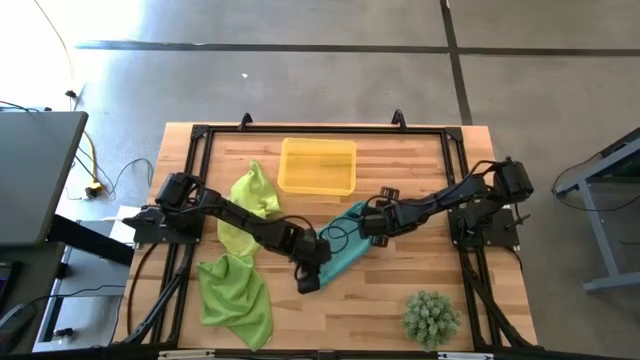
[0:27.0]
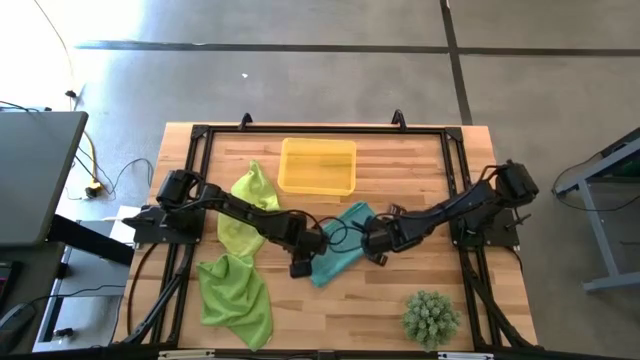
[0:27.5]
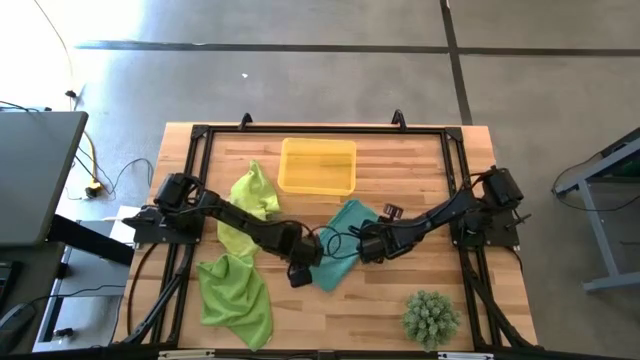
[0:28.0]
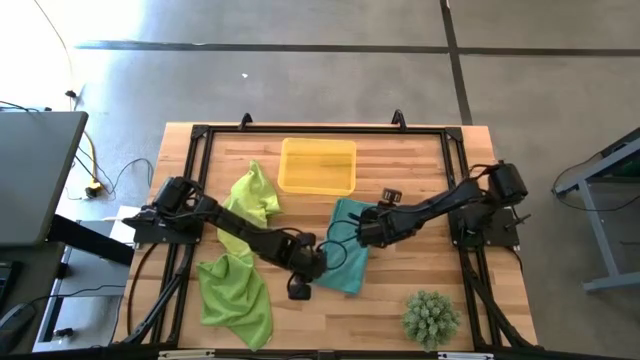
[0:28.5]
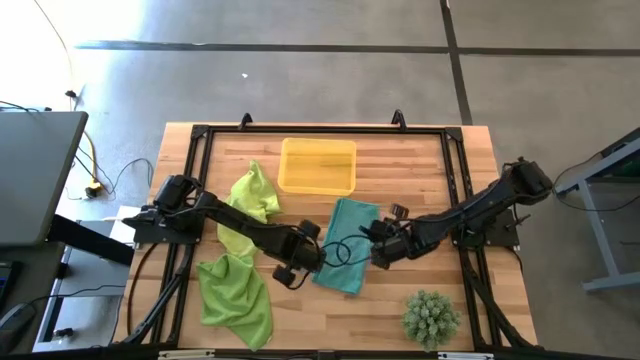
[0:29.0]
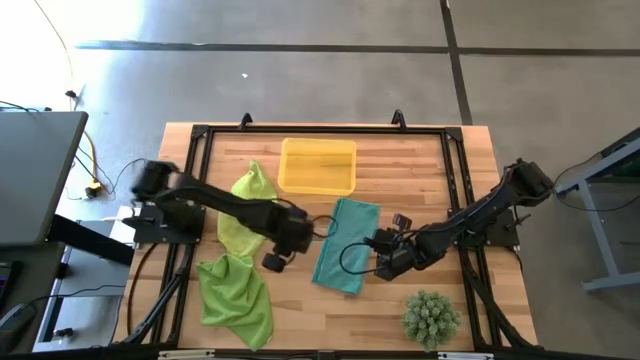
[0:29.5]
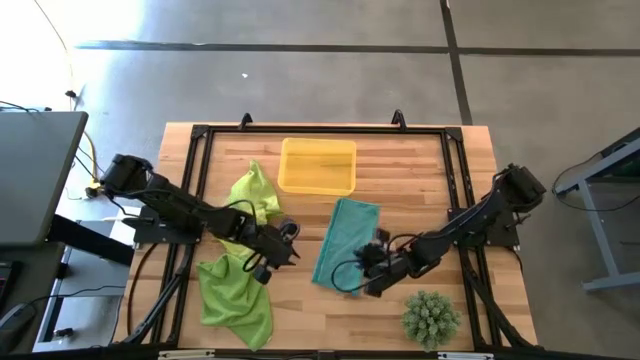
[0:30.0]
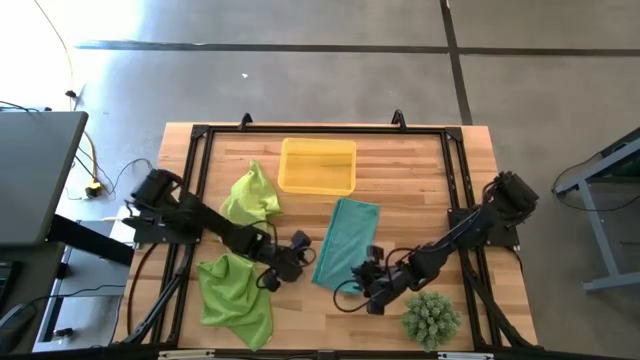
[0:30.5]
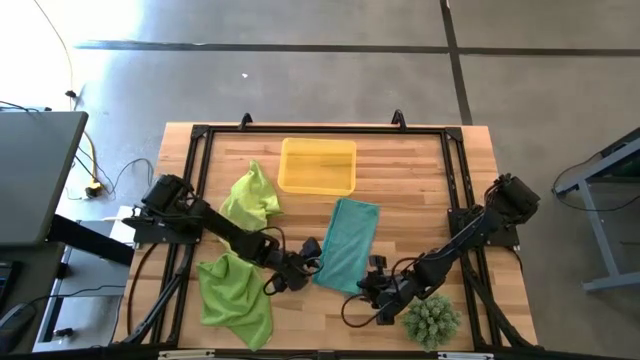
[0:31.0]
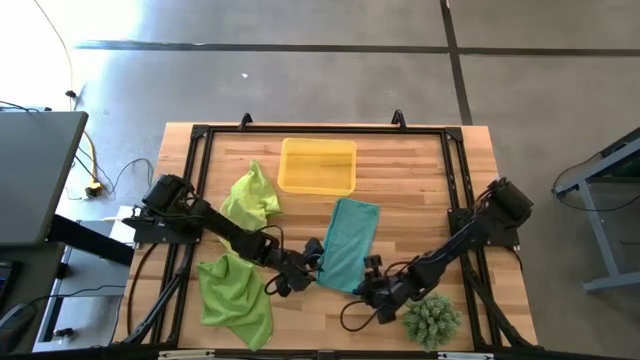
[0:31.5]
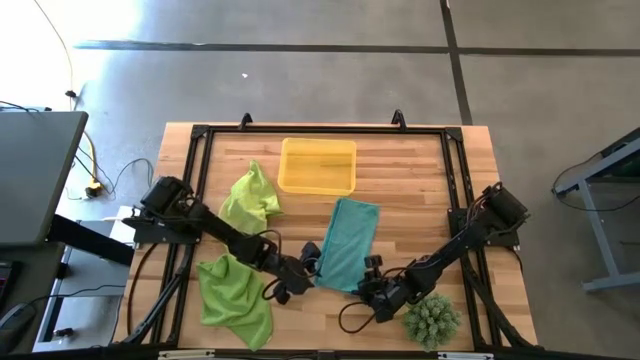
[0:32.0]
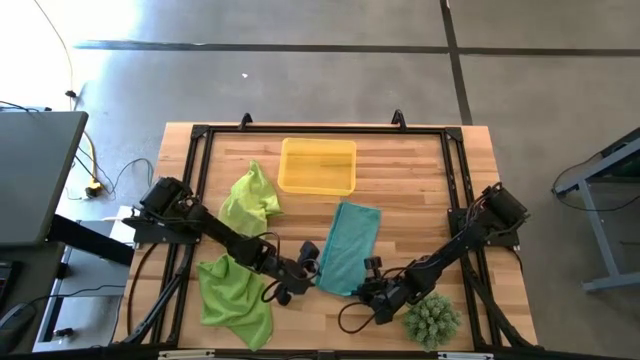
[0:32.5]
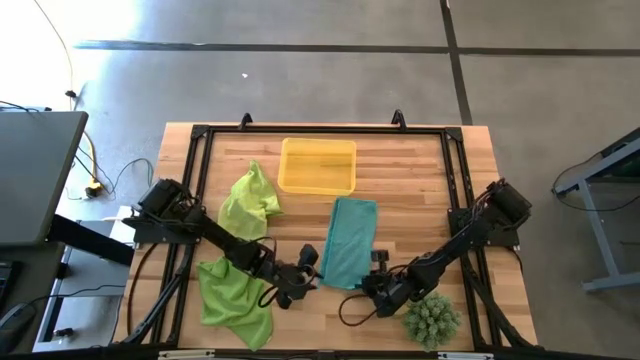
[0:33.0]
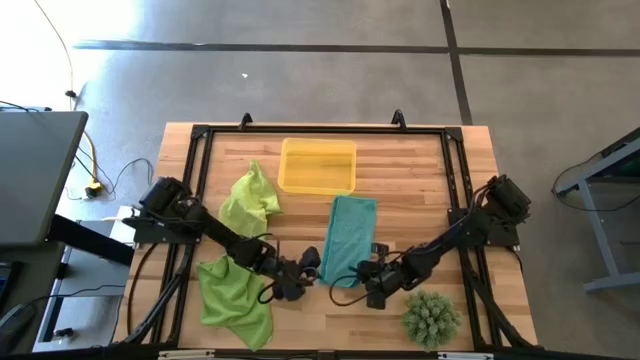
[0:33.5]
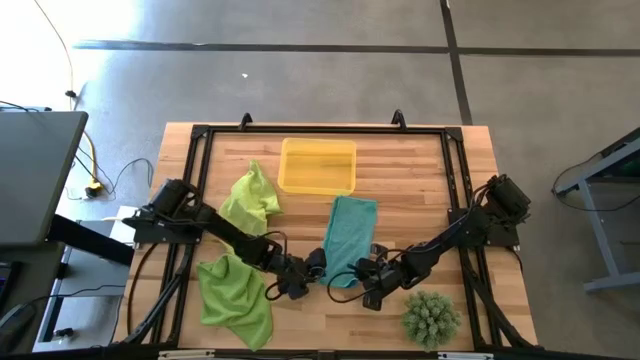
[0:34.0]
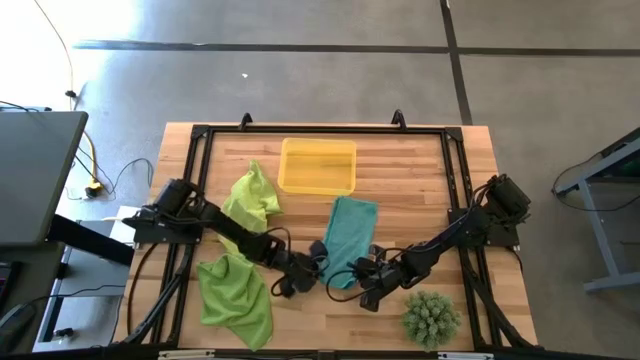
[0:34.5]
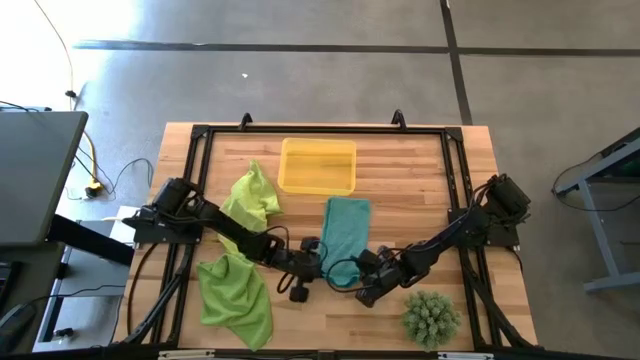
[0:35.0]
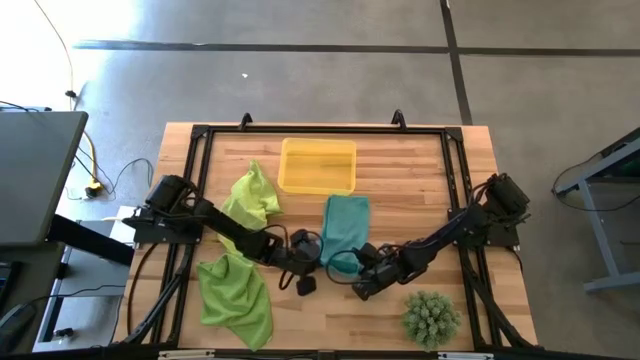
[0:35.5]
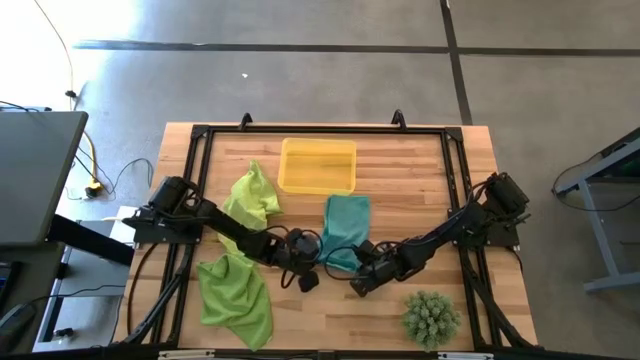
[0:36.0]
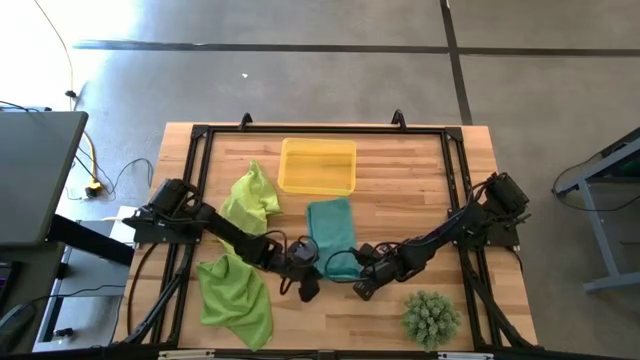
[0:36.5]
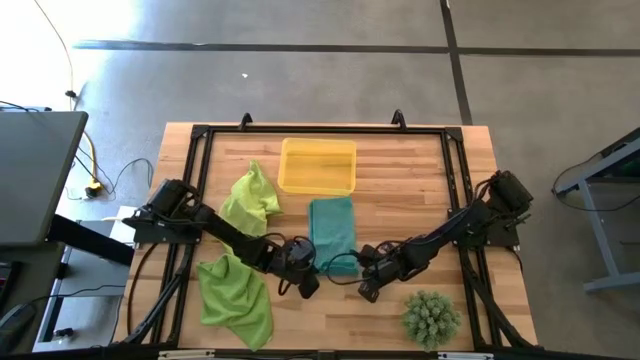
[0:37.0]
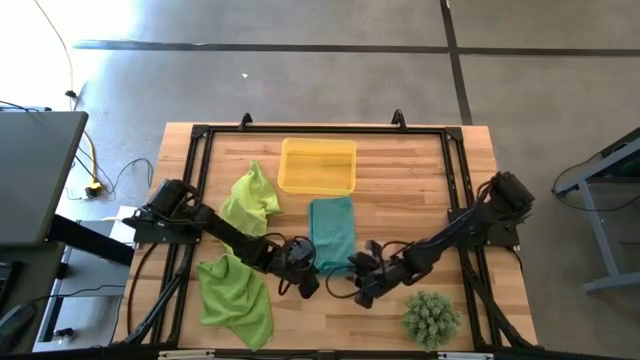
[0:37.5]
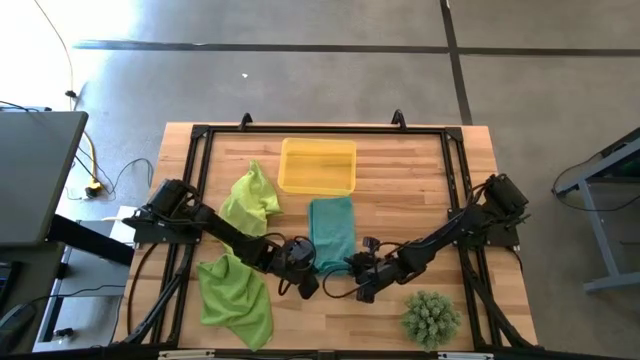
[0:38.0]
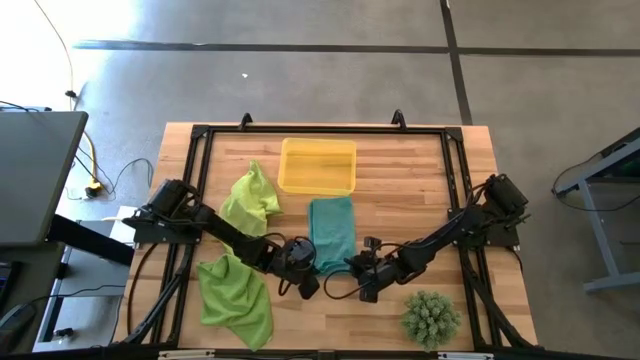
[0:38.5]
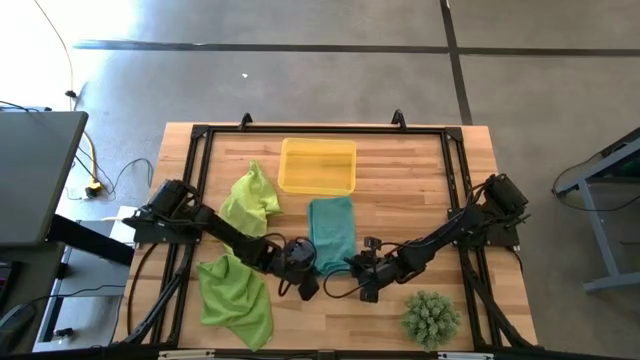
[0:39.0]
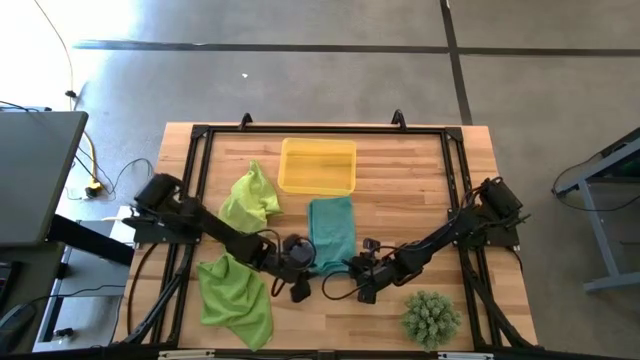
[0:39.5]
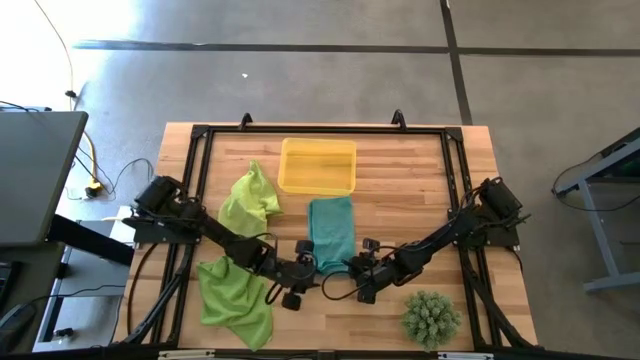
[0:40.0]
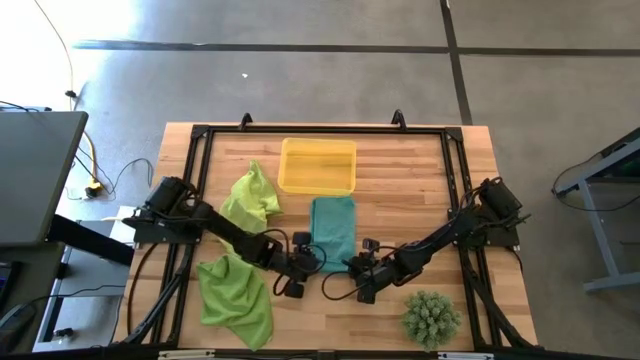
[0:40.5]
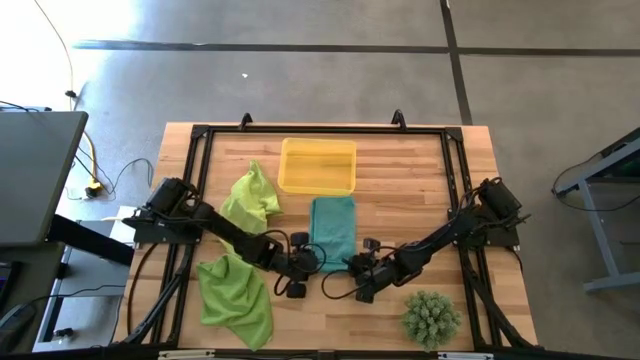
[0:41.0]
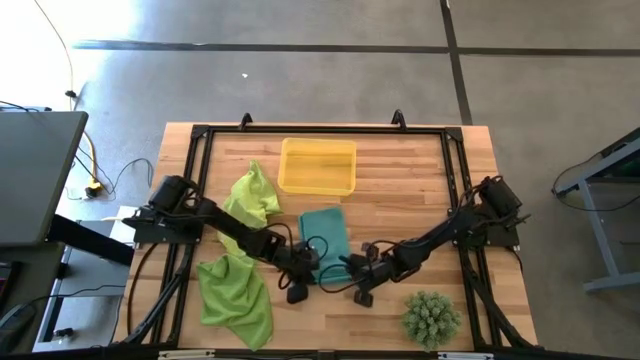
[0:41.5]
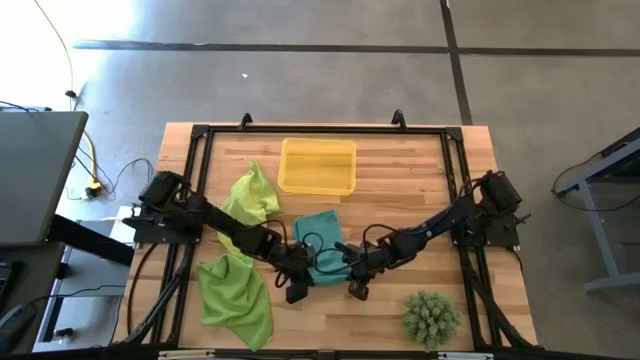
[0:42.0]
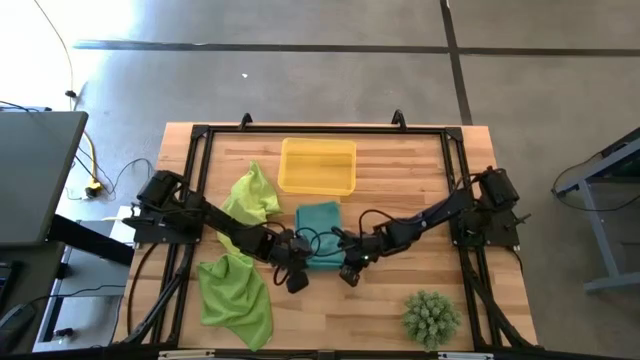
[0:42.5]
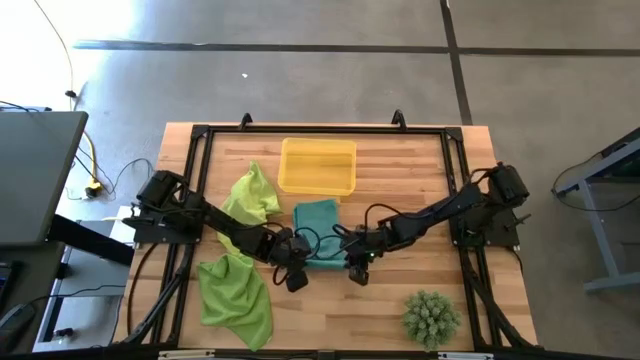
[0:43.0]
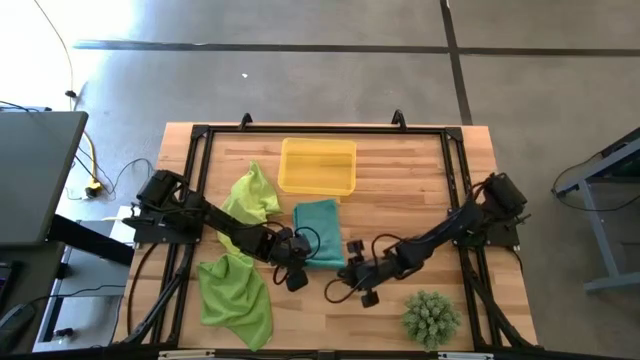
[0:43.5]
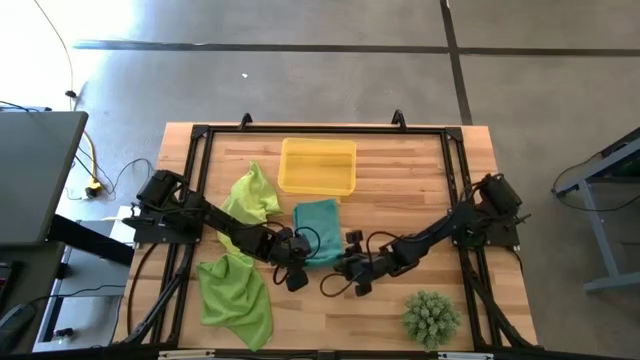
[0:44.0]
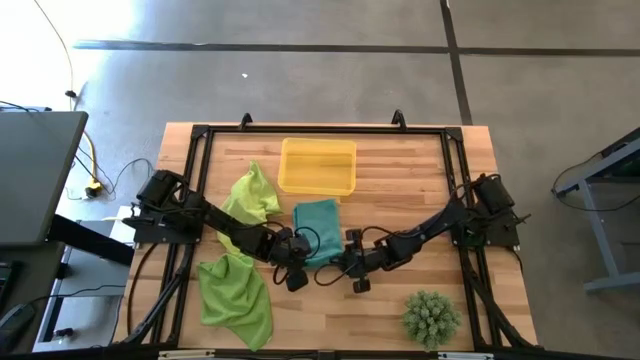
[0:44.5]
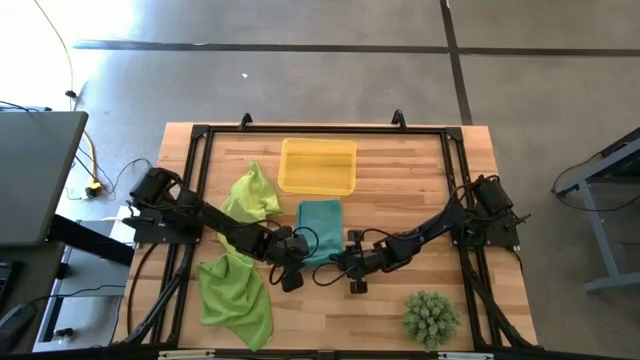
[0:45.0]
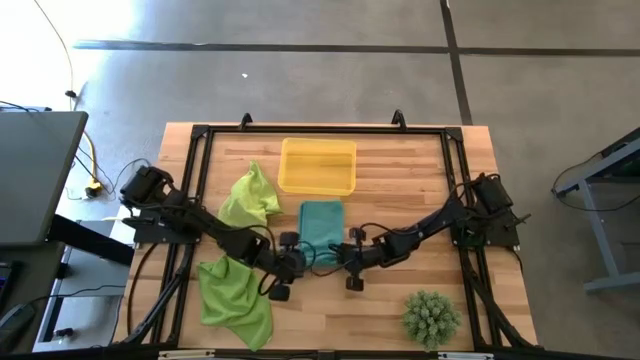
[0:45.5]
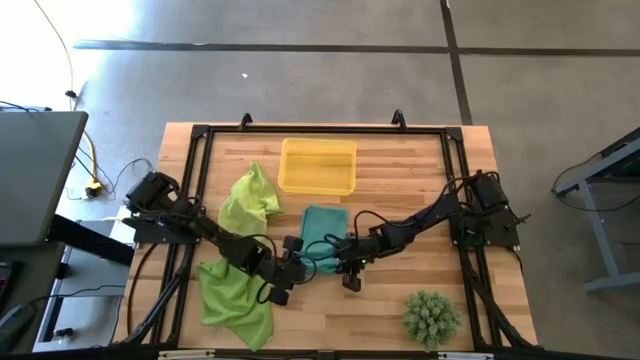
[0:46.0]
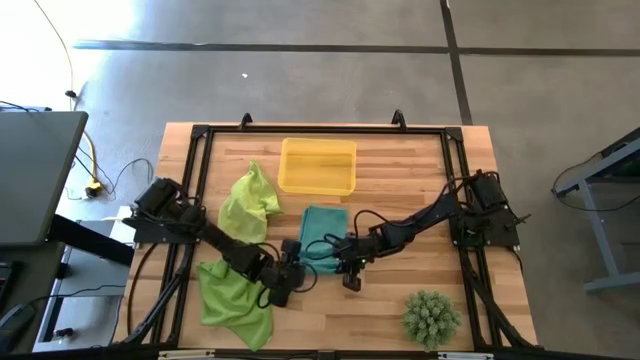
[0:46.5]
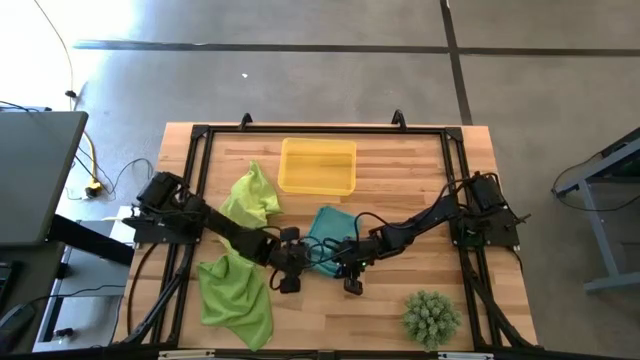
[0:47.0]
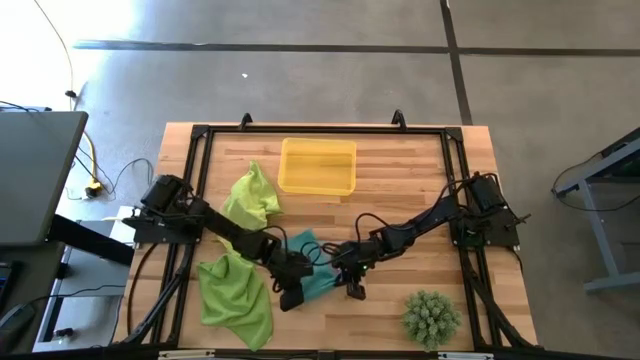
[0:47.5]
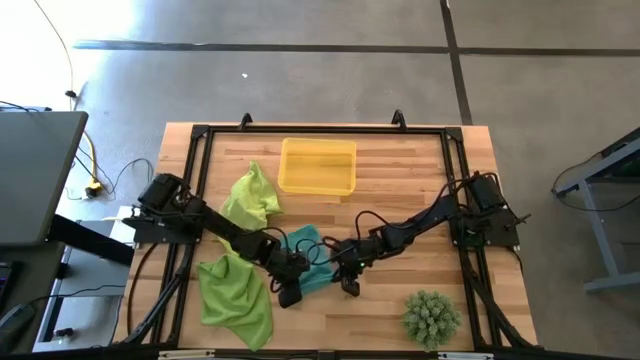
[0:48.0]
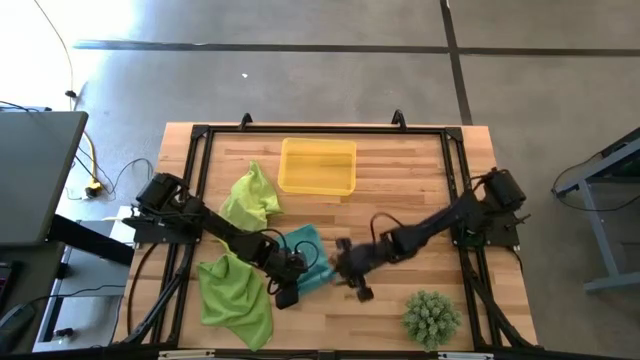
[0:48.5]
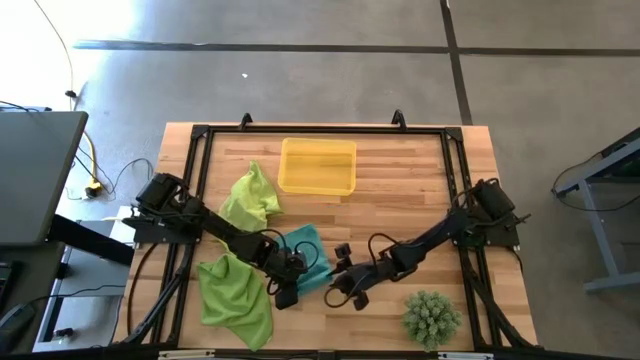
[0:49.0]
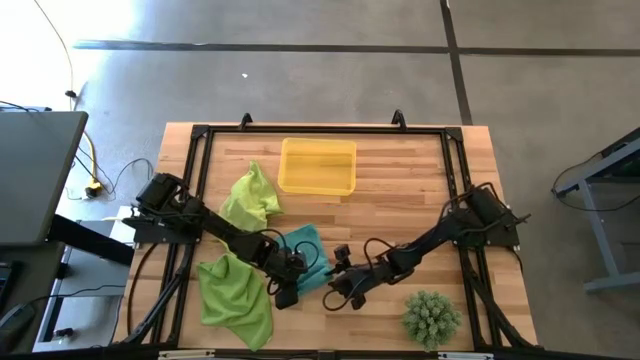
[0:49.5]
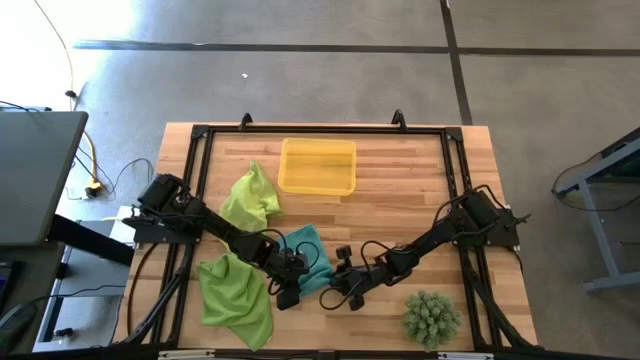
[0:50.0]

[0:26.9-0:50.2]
Task: Roll microfiber towels into tight, uniform cylinder then place into a basket
Roll the blue microfiber towel
